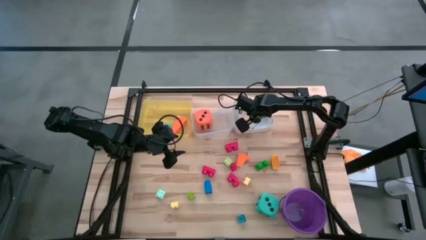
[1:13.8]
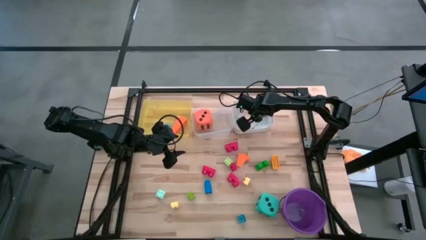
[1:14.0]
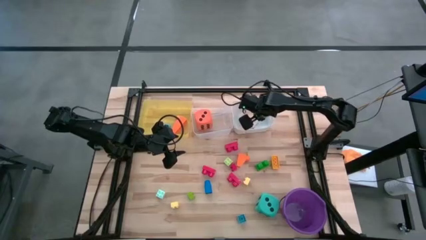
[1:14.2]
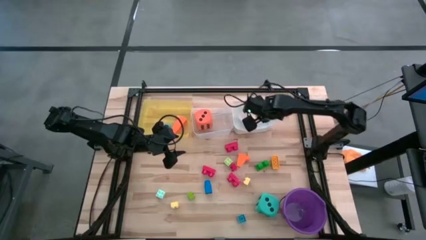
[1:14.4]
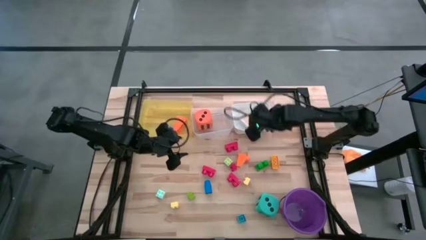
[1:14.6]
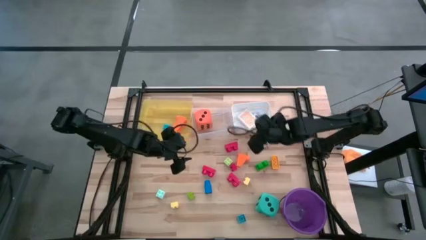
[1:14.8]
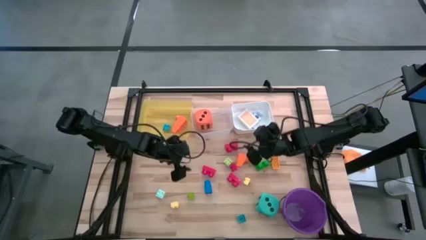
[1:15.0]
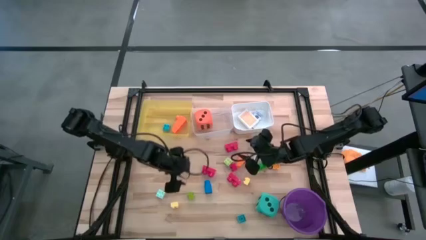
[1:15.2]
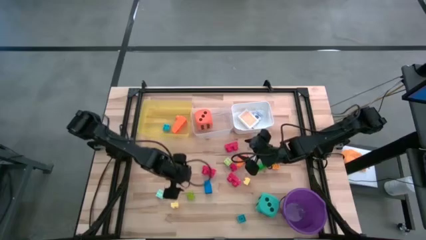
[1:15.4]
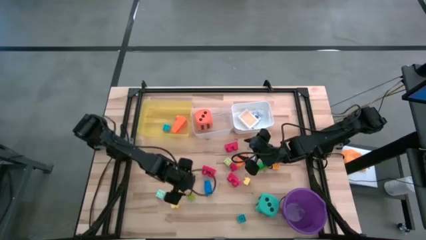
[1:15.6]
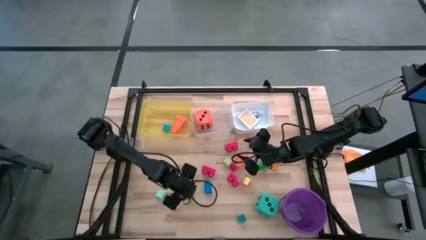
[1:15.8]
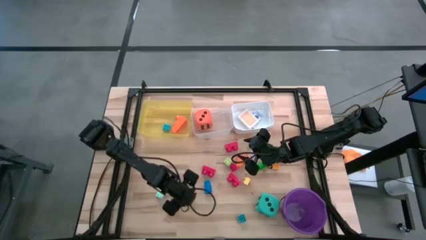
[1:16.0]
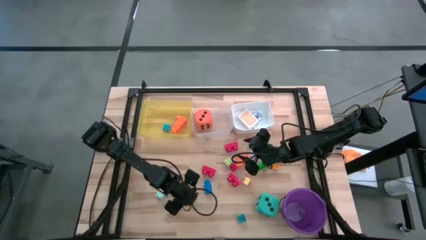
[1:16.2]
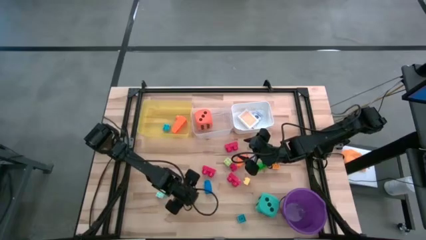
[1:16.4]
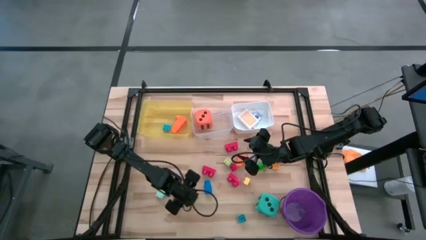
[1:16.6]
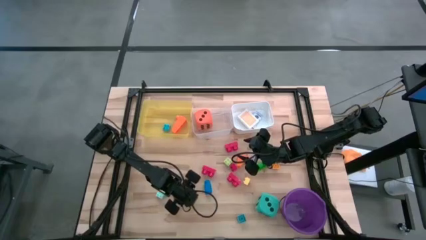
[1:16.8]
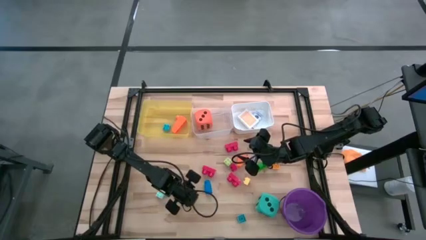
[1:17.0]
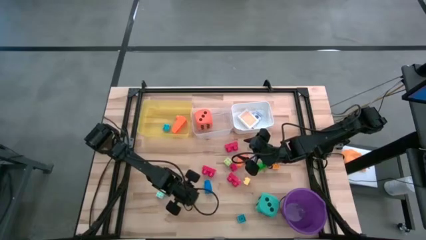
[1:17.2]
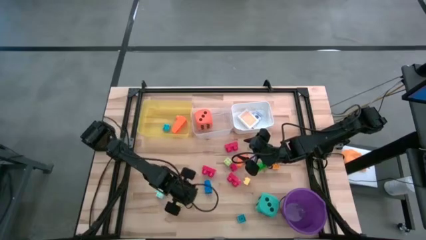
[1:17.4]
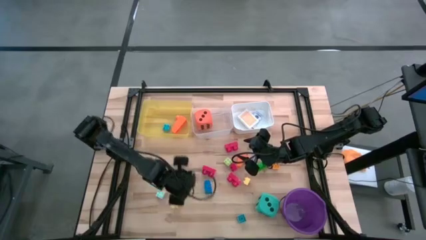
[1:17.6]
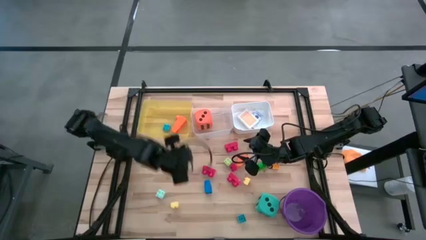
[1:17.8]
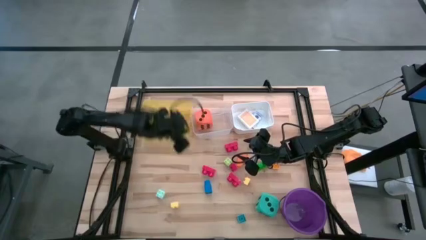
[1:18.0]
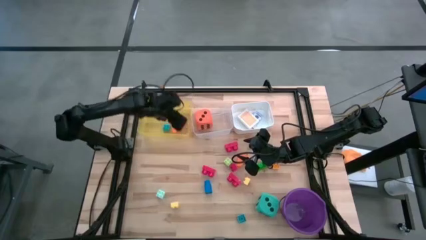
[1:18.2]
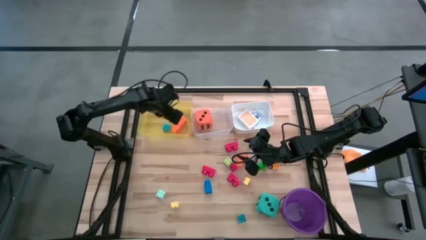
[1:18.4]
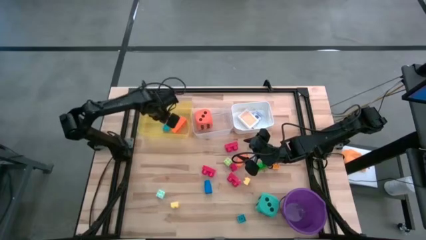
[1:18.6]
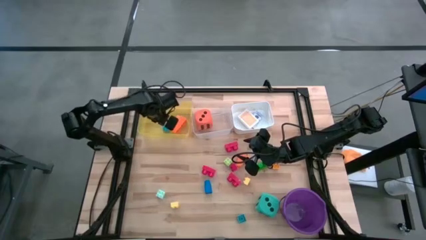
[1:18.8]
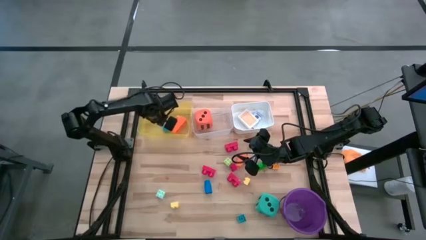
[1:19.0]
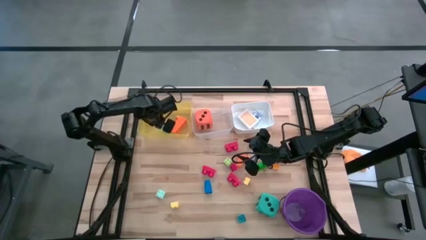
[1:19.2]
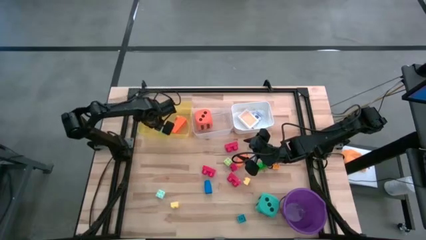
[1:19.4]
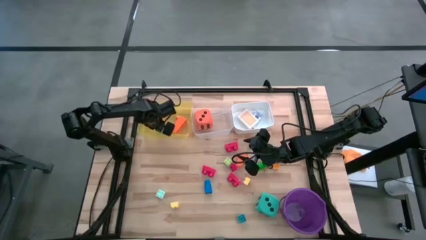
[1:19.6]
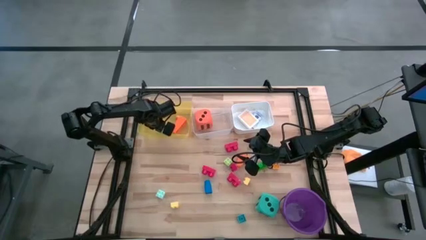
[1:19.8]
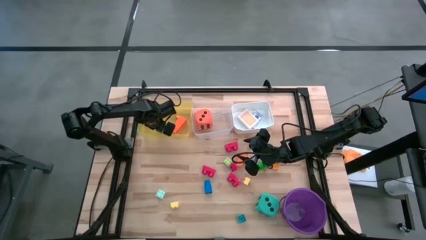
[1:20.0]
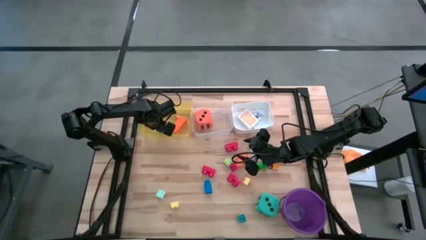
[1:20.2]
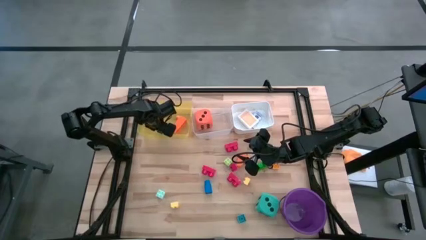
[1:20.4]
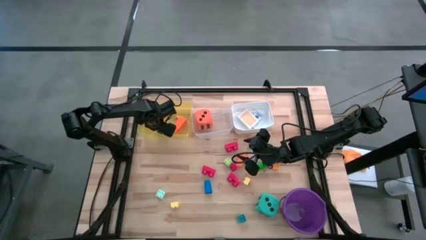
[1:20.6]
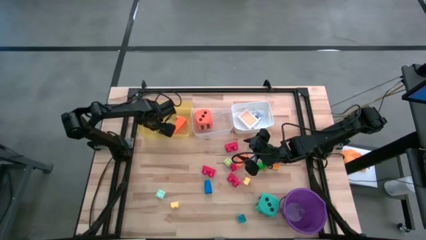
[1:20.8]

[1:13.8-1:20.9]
Task: Pick & Place Toys
Put the green game piece into the yellow bin

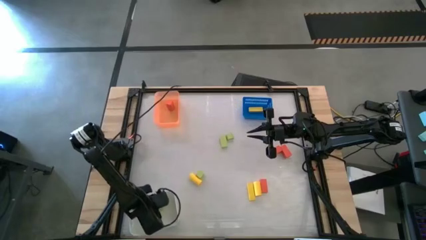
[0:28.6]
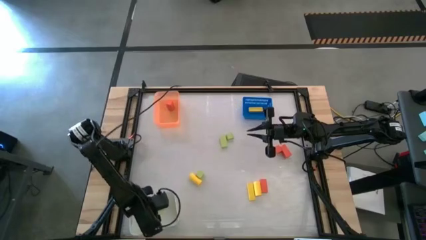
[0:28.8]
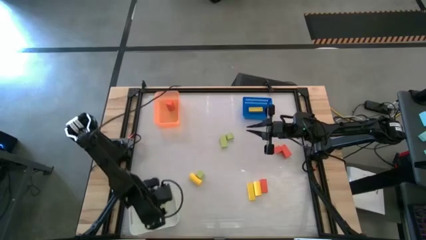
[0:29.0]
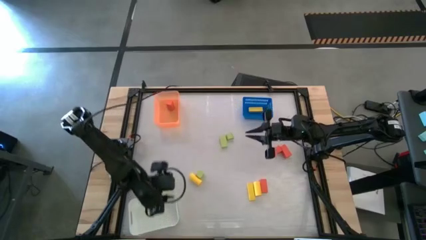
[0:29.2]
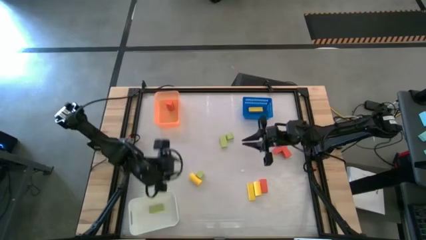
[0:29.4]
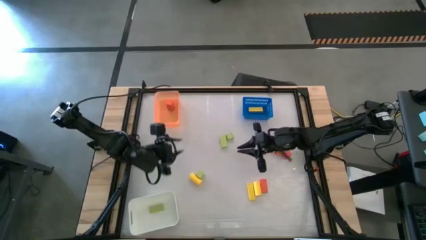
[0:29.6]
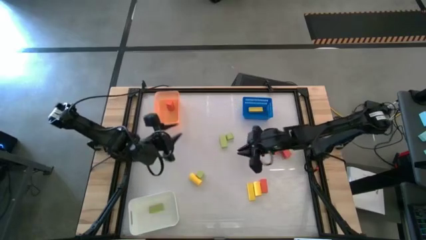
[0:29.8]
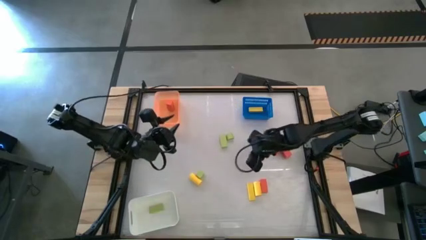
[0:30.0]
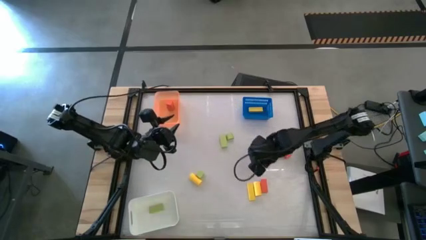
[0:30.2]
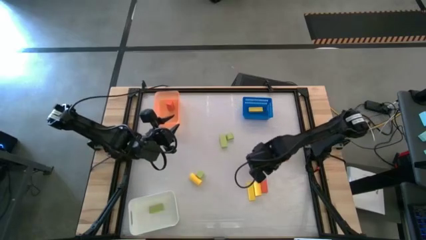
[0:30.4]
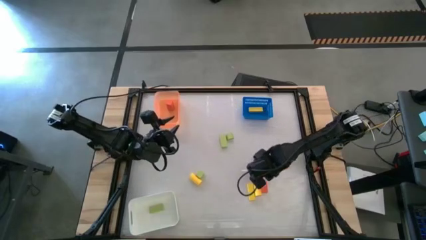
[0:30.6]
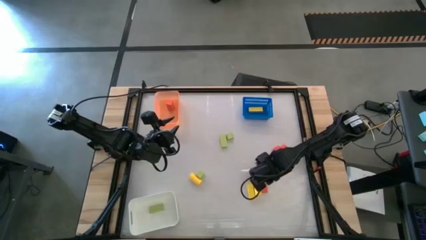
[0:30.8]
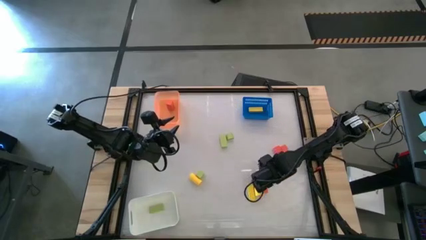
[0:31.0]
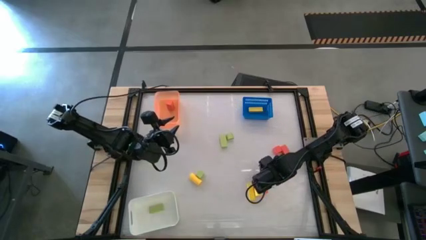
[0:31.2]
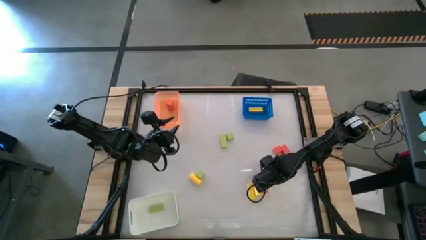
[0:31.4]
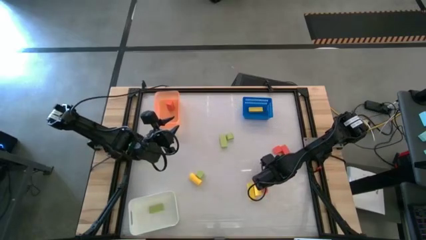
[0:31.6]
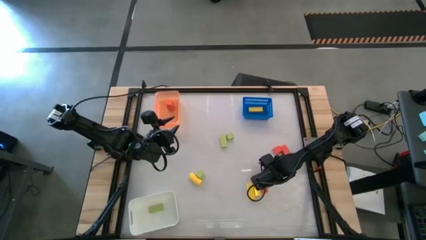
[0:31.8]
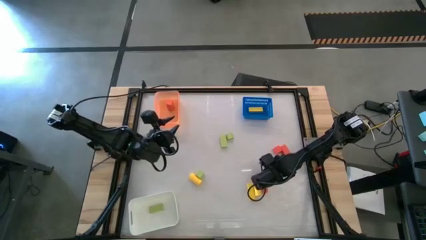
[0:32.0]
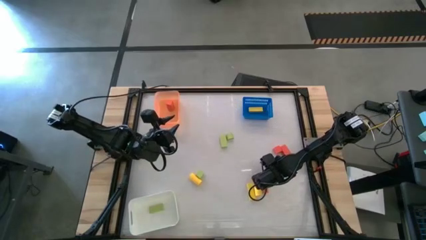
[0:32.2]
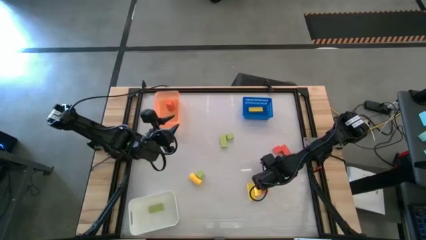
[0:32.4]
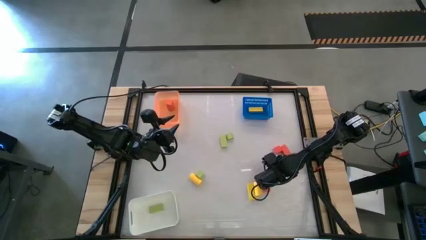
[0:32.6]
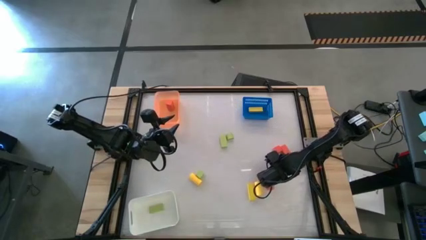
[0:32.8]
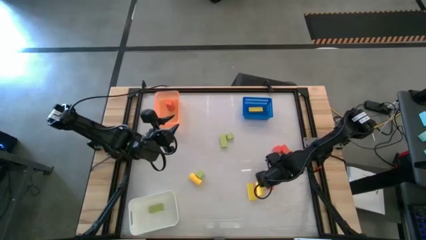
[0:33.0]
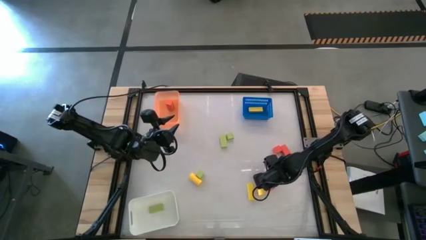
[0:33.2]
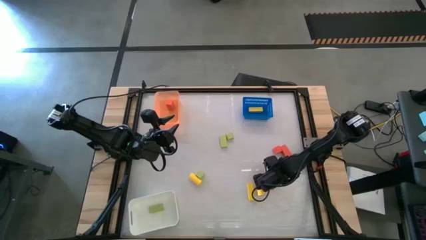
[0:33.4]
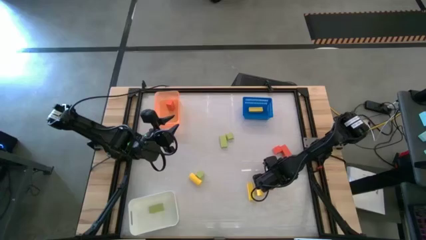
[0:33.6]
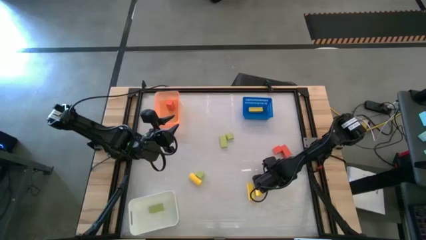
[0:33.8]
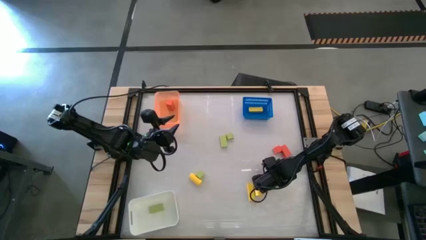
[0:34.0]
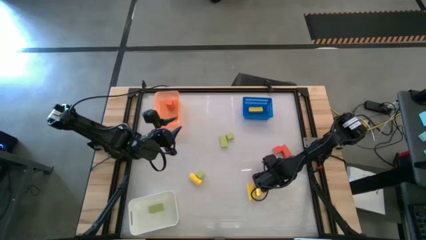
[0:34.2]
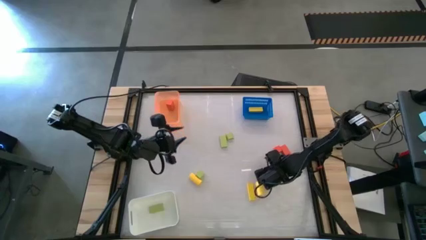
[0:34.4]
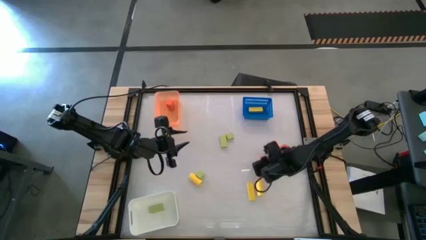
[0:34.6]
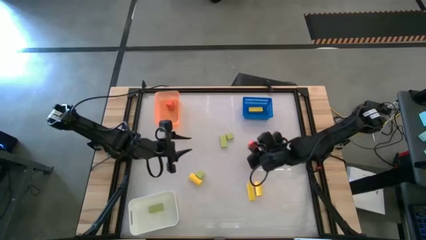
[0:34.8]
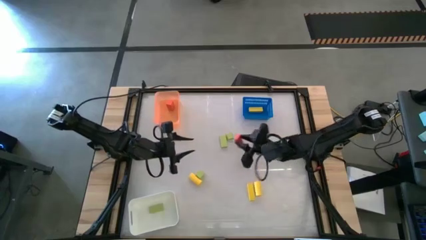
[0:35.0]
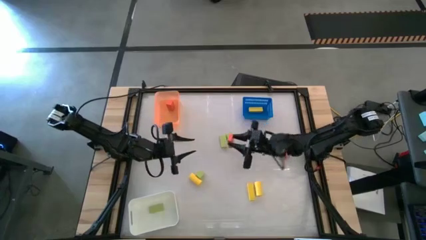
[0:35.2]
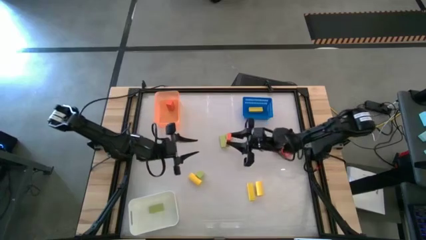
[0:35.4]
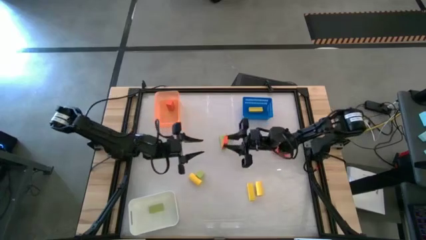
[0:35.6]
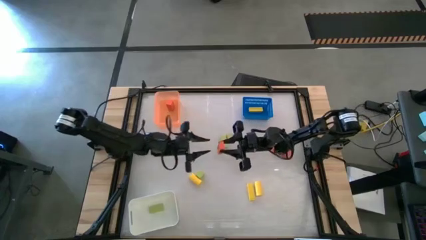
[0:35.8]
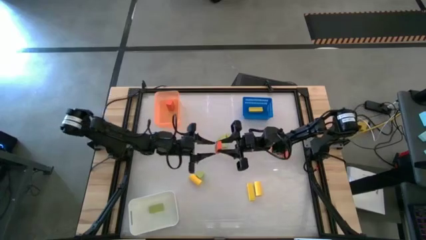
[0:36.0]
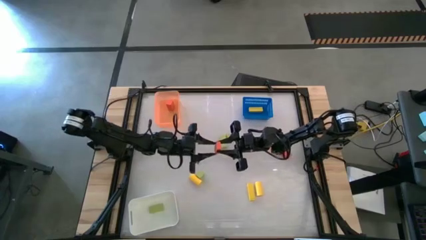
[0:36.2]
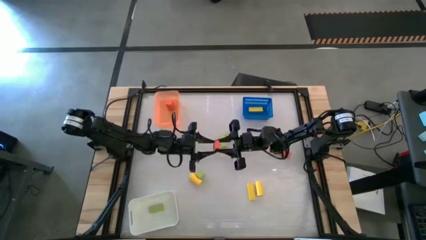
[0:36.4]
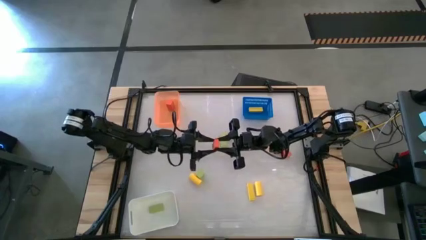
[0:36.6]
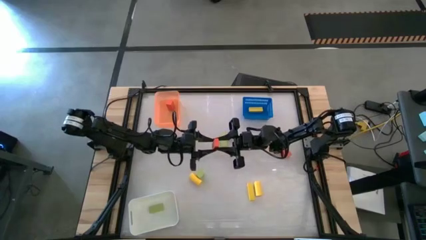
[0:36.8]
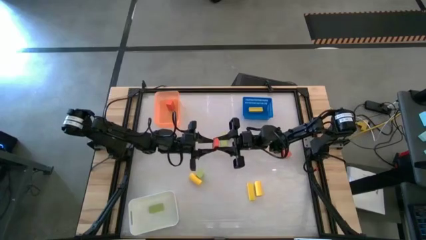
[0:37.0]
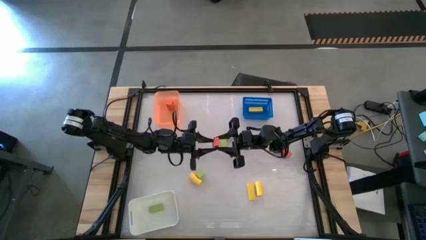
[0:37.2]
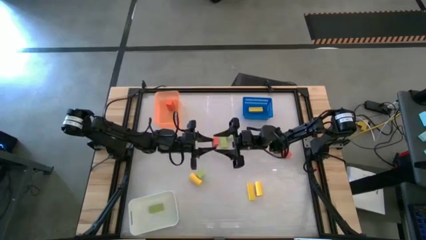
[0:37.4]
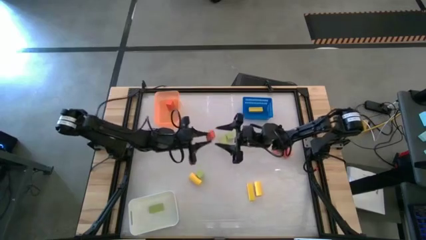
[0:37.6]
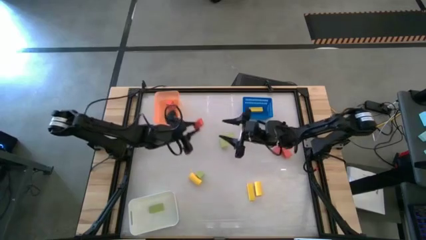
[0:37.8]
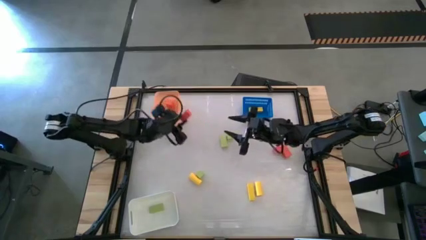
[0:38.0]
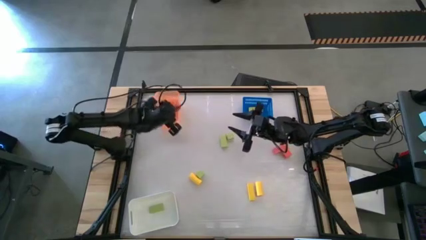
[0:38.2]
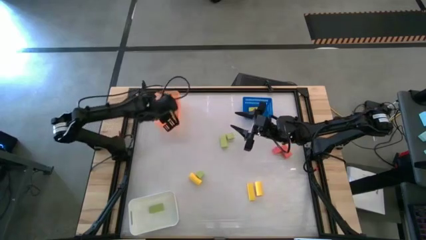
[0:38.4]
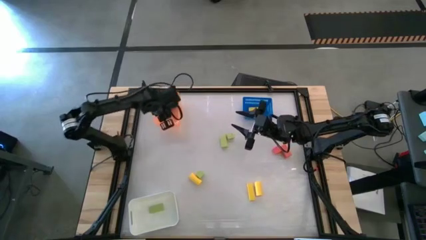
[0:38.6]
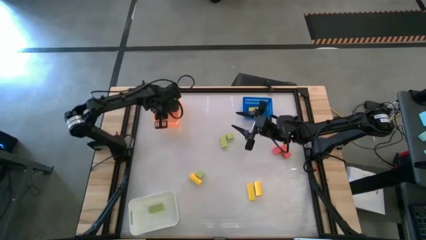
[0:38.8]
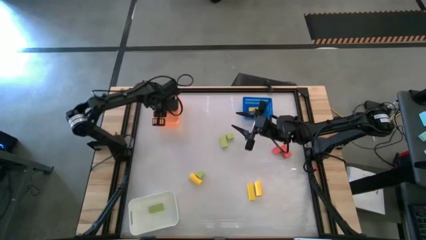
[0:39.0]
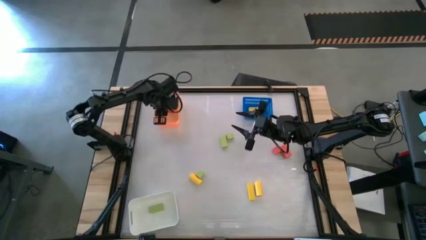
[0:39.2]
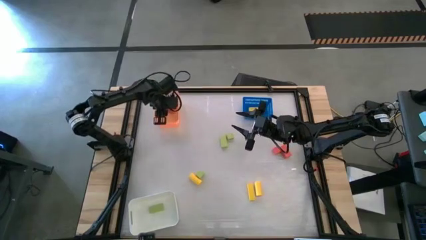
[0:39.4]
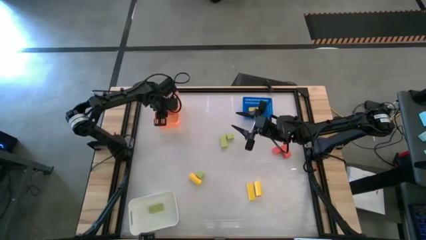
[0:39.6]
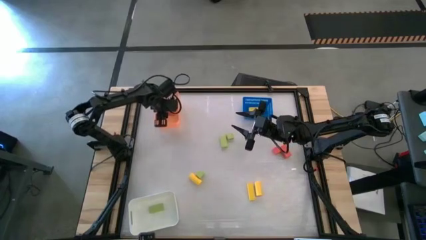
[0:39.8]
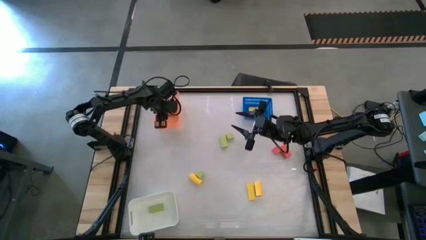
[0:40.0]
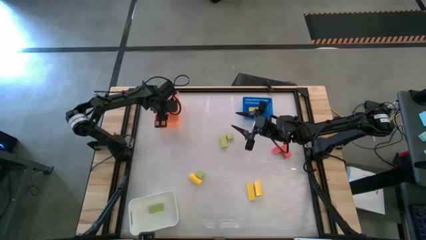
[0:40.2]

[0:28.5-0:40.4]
Task: Sort & place blocks by color
Put the orange wooden block into the orange bin
